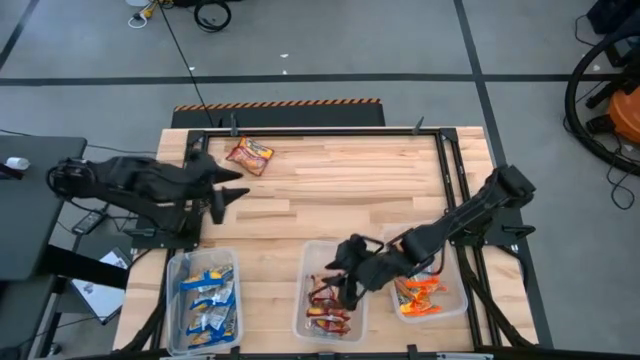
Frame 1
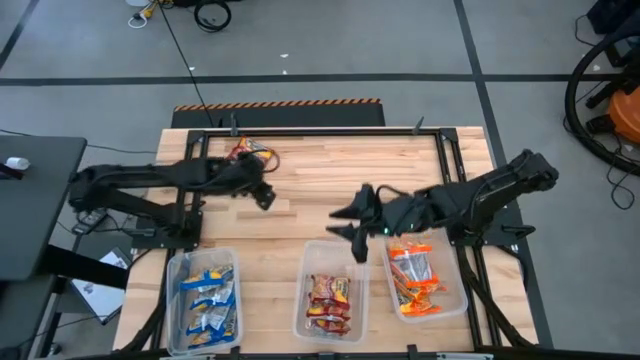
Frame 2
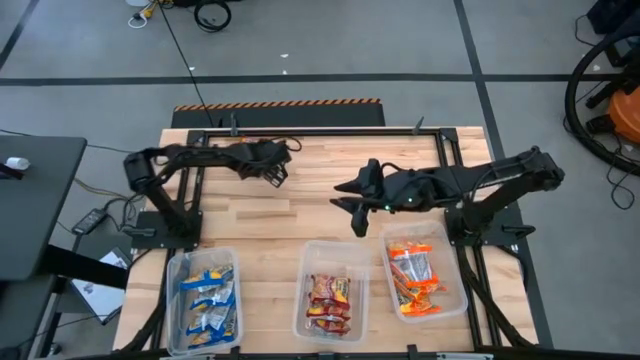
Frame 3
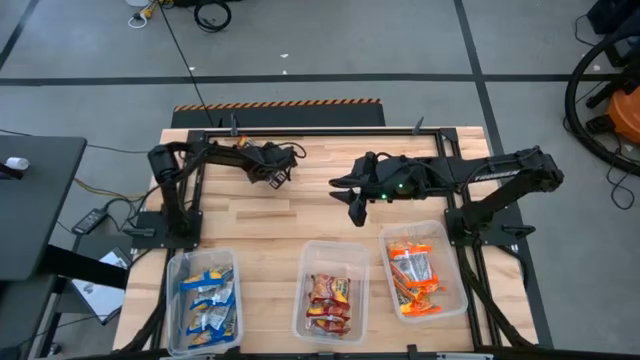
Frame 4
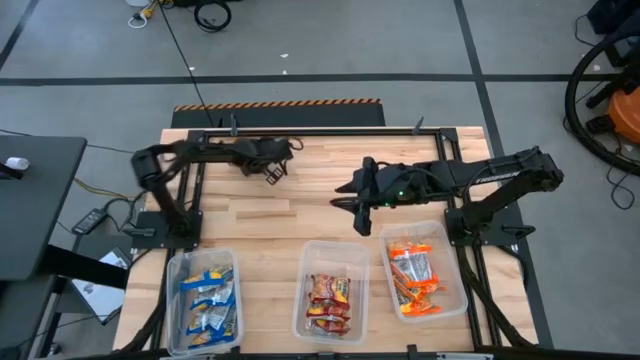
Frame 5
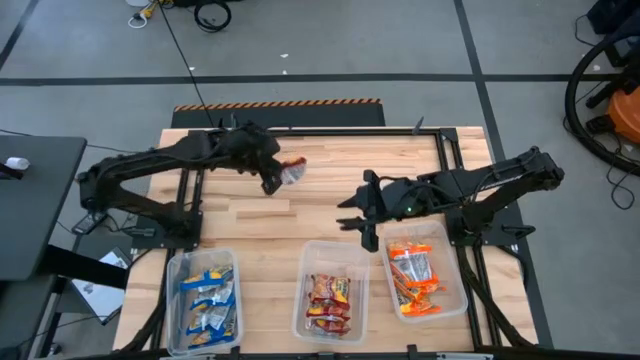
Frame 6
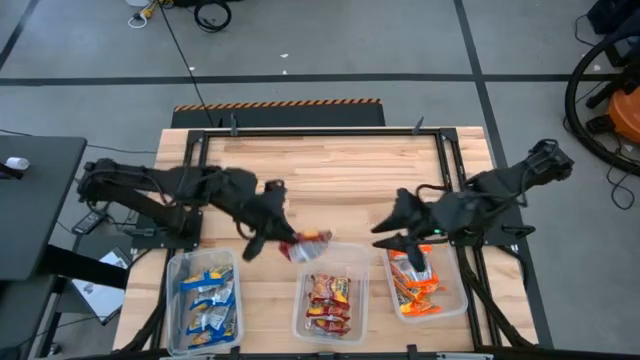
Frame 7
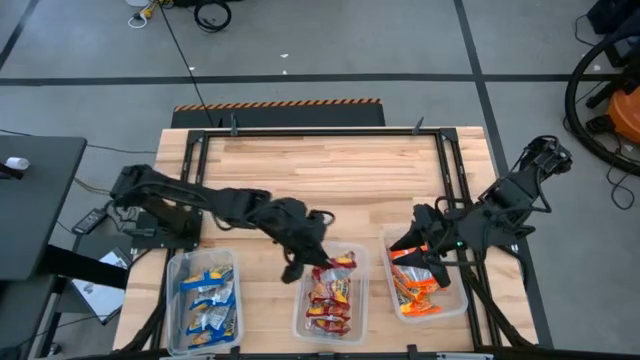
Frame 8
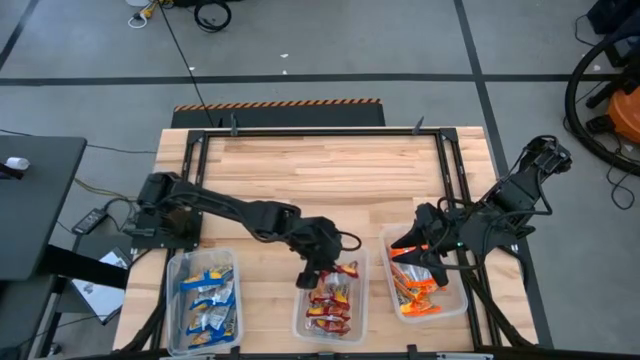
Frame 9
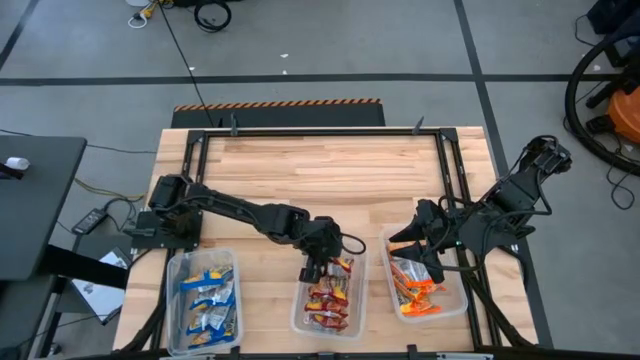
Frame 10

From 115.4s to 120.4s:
Task: Sort Maruchan noodles
Put the red noodle pack into the center transparent bin

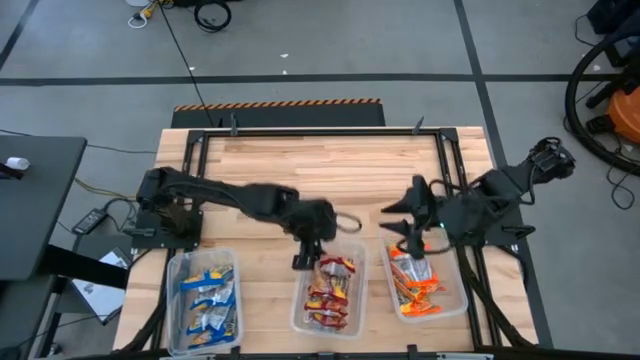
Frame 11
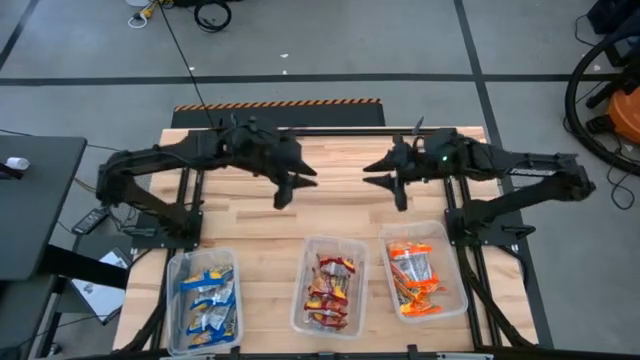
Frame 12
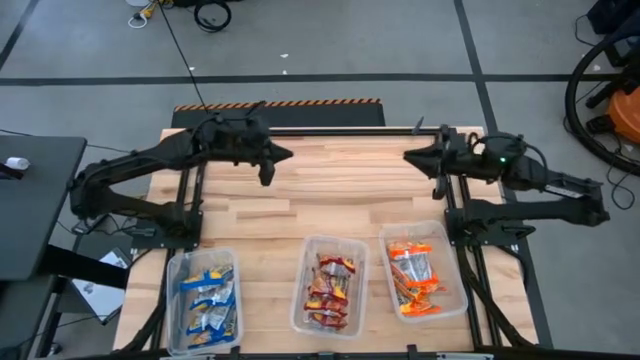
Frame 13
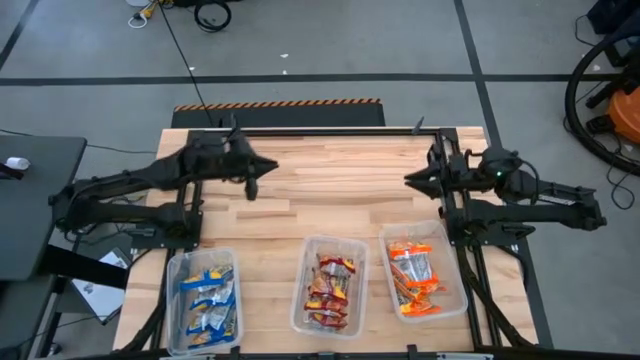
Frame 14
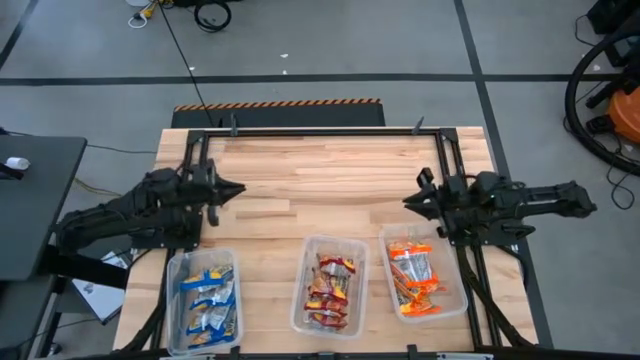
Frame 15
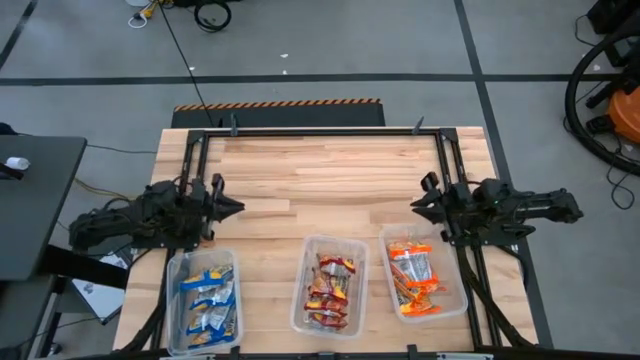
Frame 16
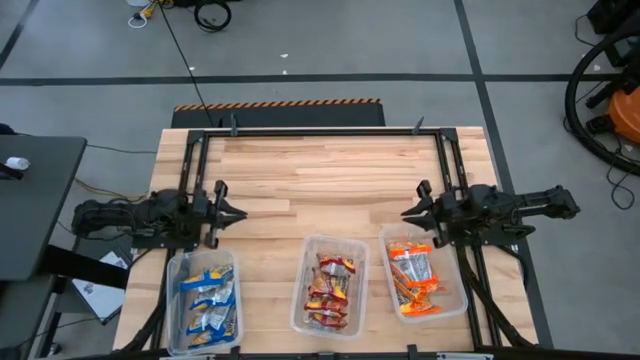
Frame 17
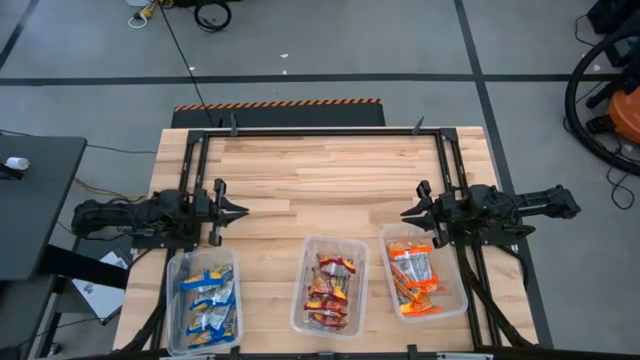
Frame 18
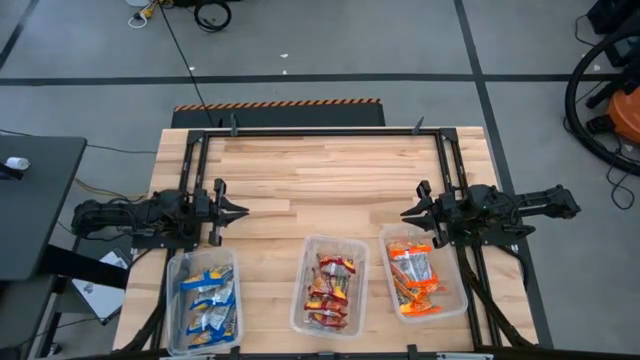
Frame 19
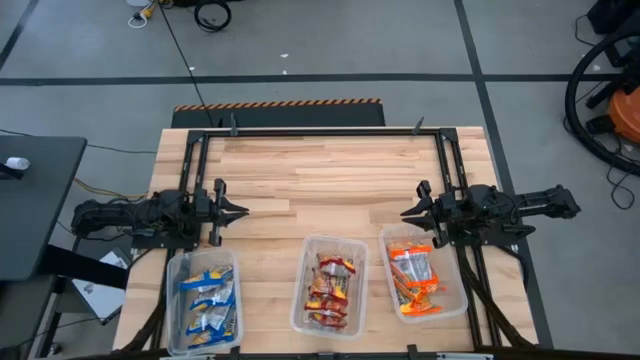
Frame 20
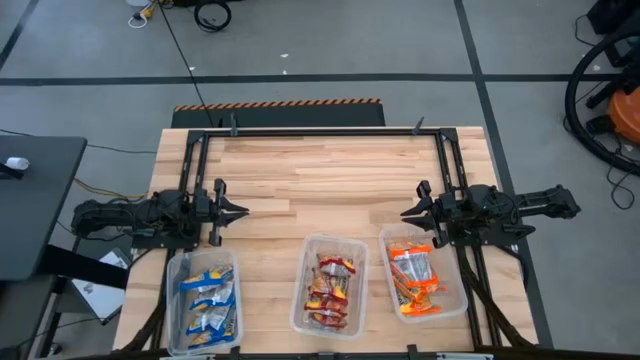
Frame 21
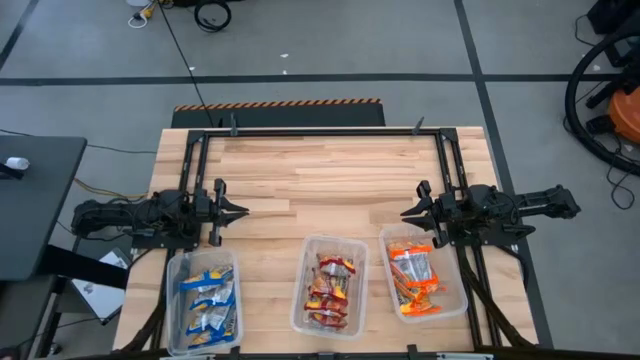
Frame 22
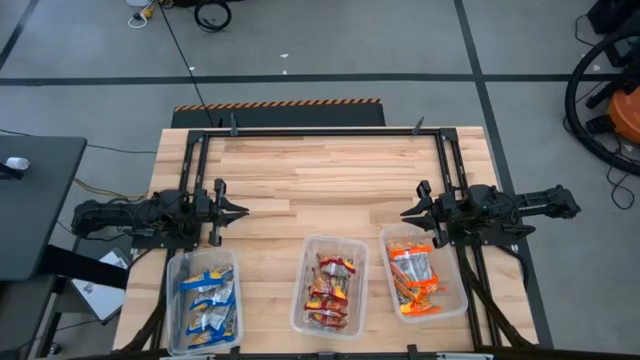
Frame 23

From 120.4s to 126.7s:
Return to Home Position

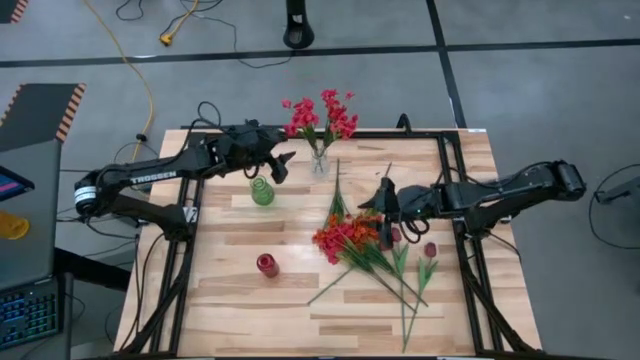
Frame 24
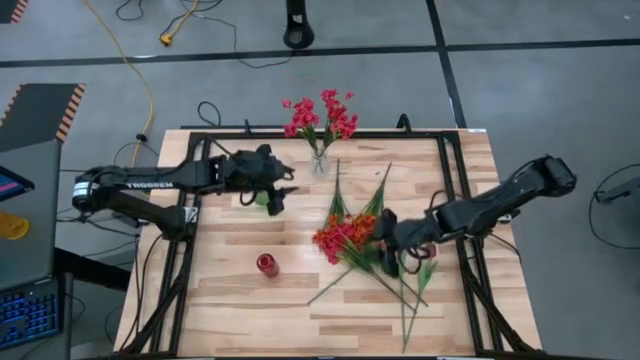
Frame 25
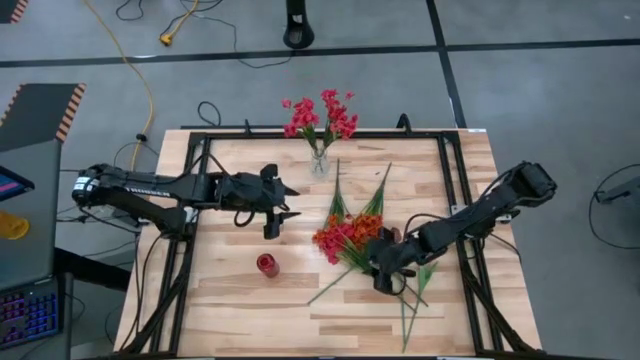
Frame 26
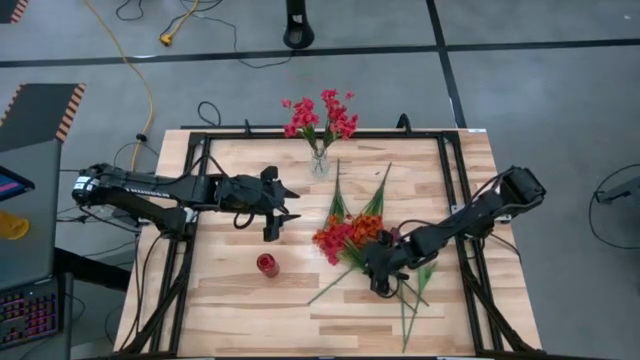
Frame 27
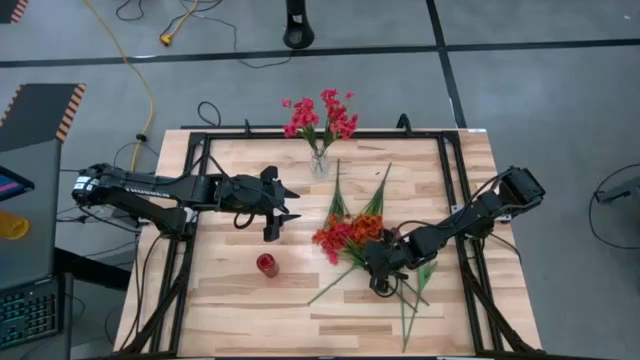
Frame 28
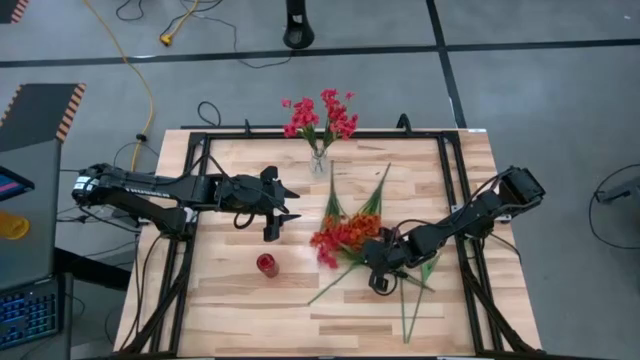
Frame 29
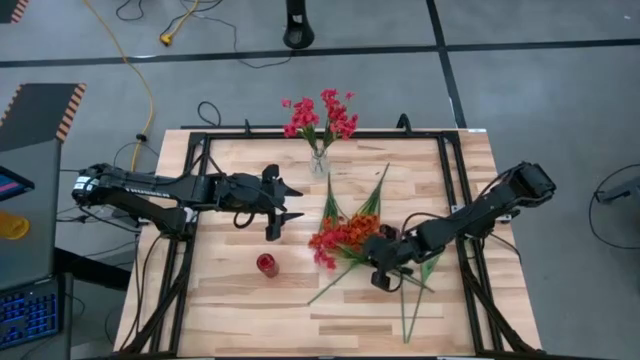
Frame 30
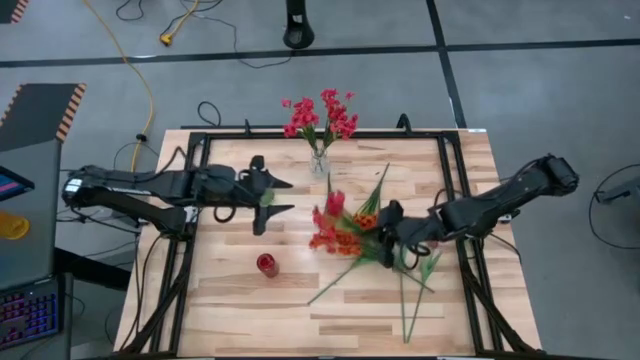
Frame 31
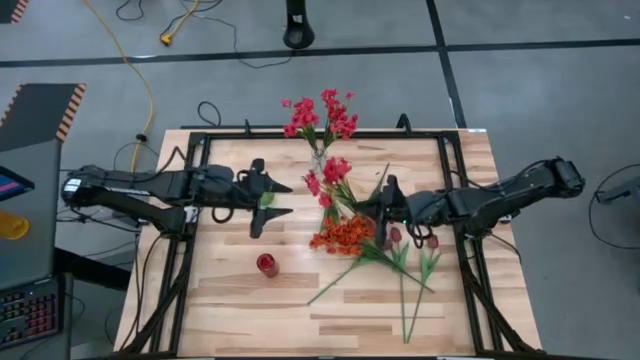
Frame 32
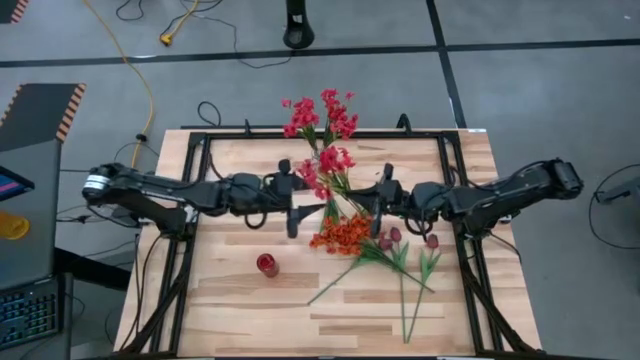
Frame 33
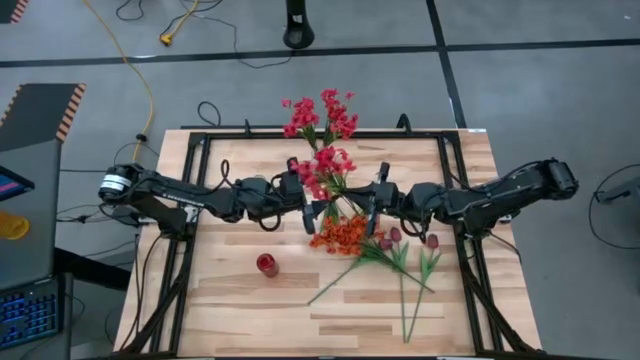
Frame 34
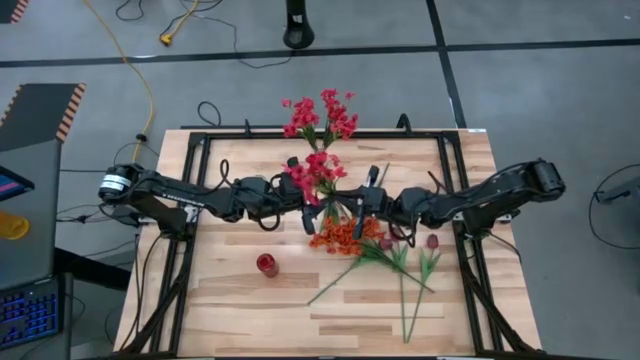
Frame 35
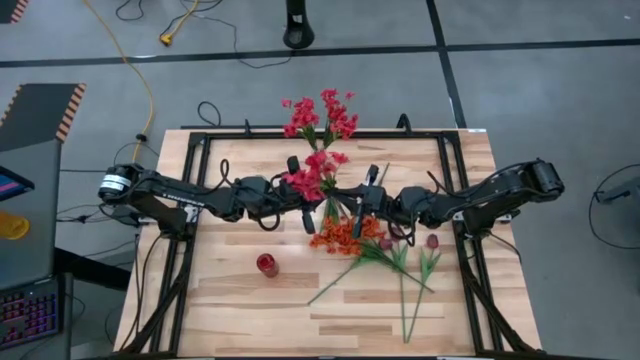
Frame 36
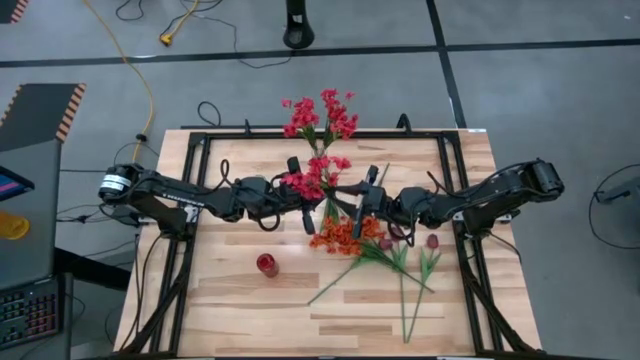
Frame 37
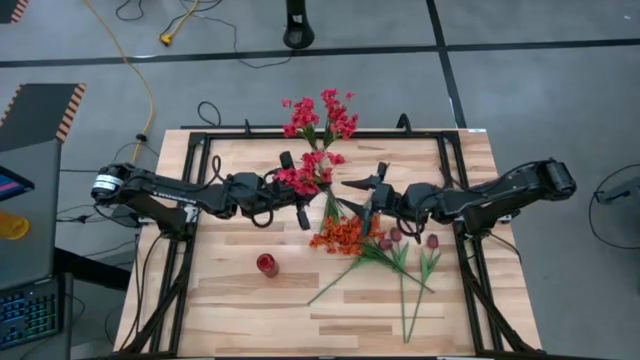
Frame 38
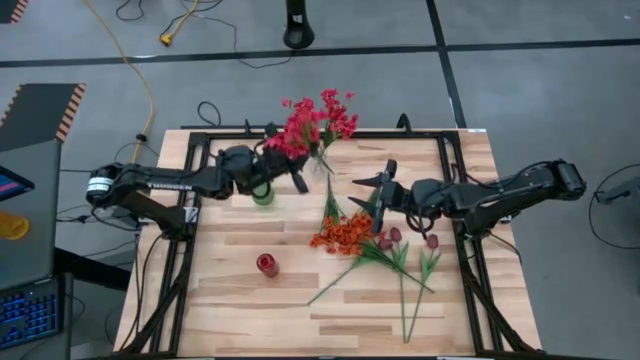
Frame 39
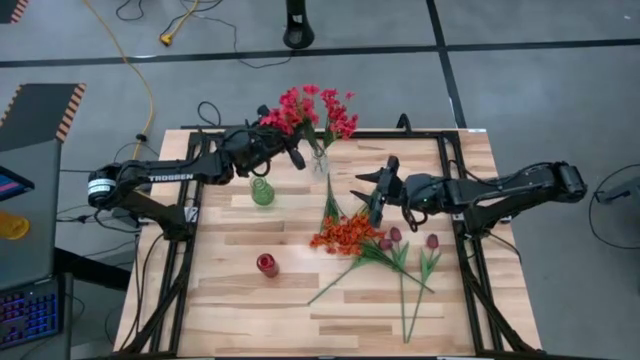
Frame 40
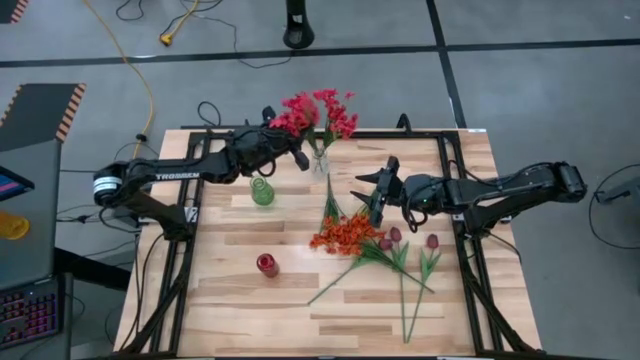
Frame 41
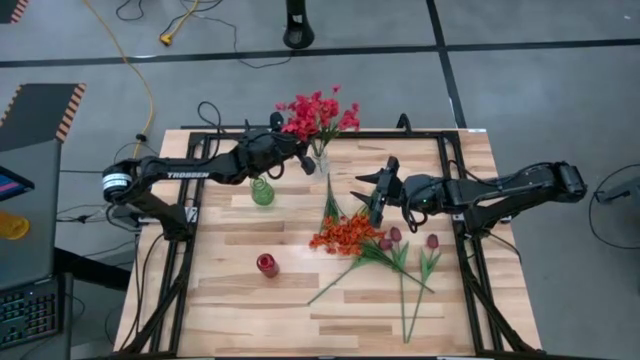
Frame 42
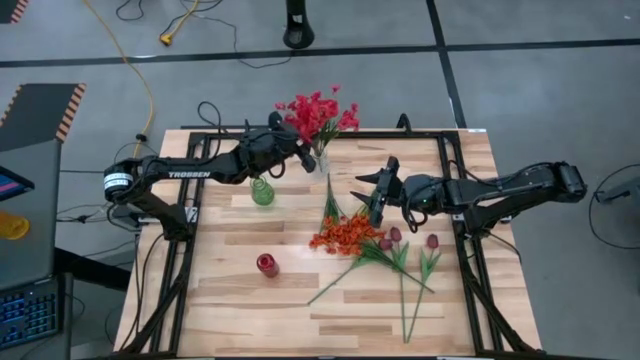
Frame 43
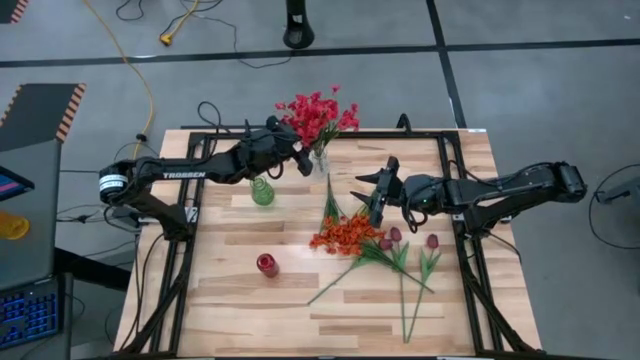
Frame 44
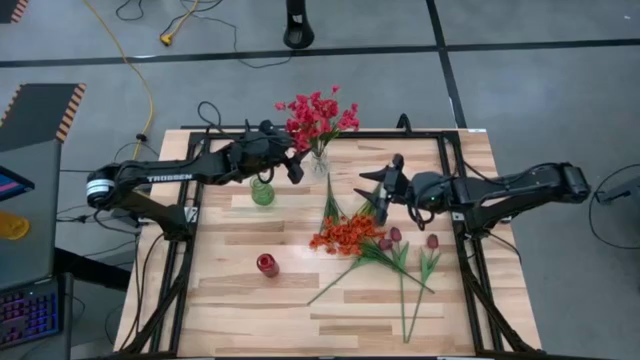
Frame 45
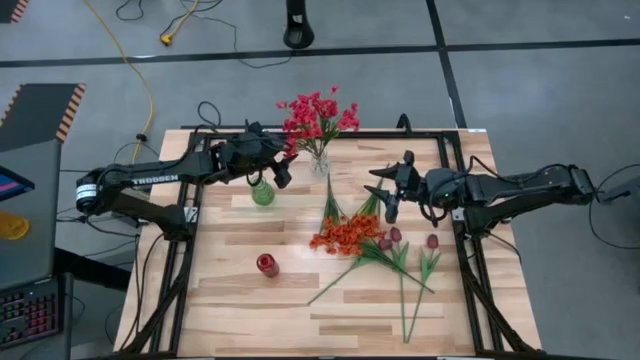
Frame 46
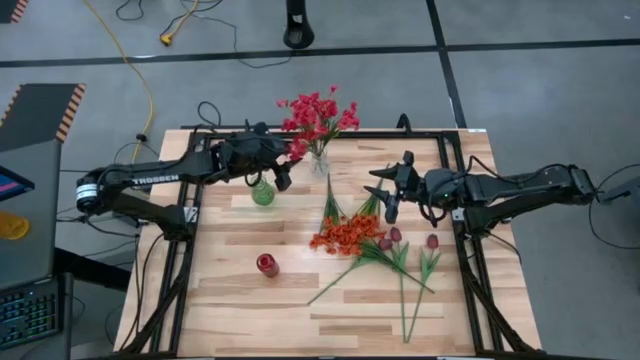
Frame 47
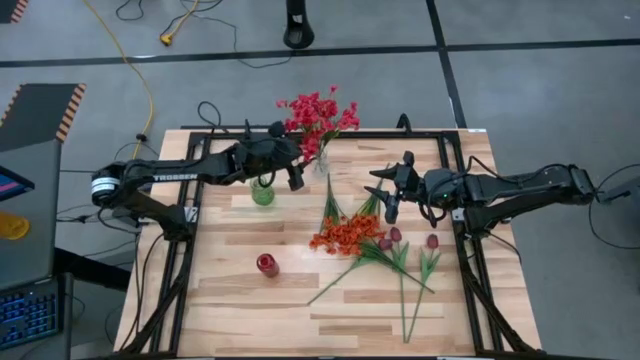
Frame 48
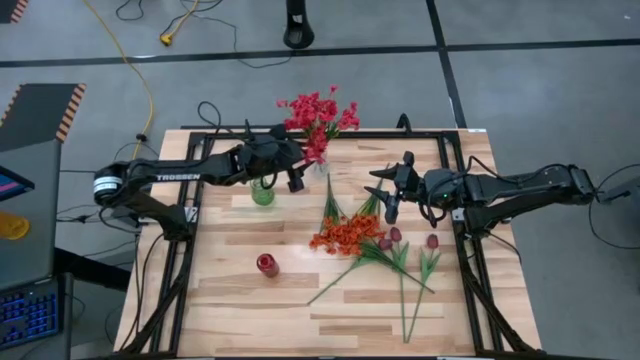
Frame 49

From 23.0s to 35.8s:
Task: Sort flowers into vase by color
Put the red flower into the vase
